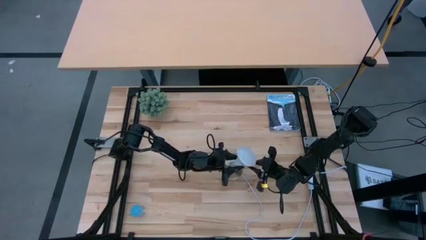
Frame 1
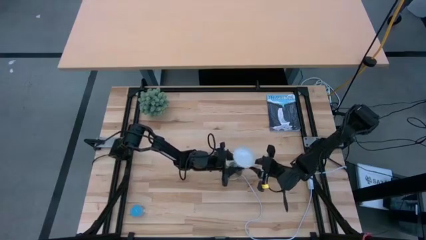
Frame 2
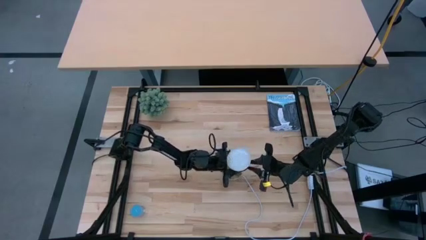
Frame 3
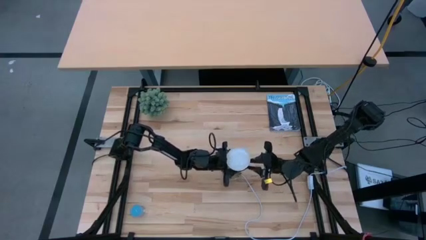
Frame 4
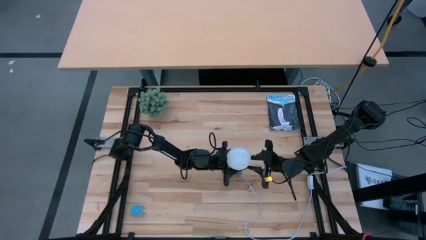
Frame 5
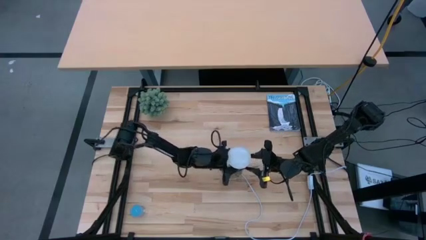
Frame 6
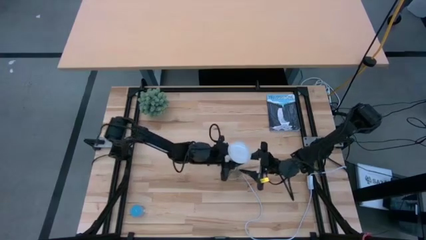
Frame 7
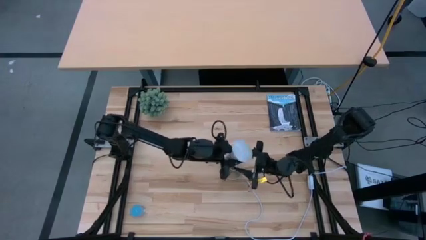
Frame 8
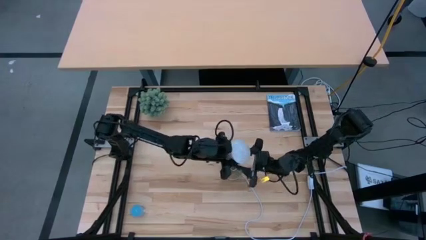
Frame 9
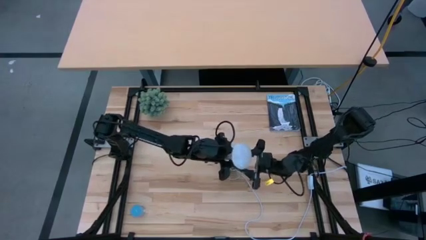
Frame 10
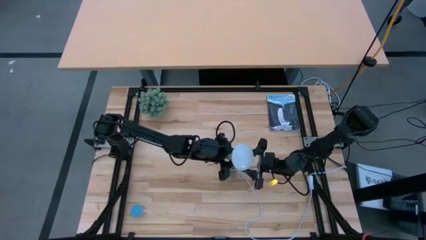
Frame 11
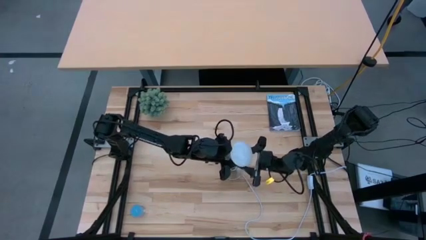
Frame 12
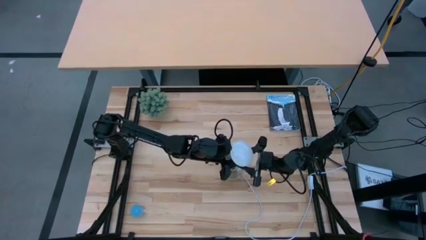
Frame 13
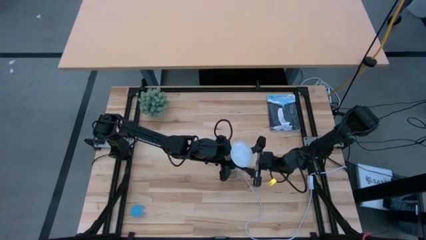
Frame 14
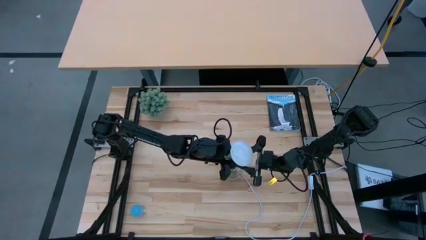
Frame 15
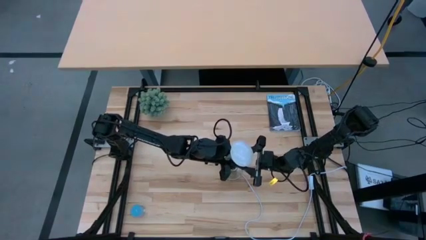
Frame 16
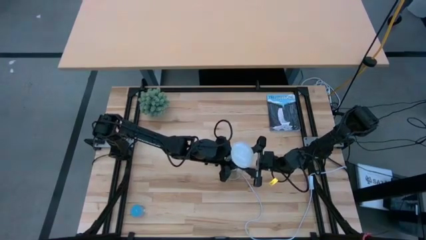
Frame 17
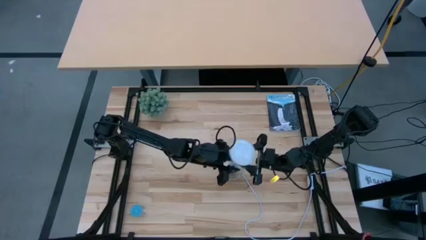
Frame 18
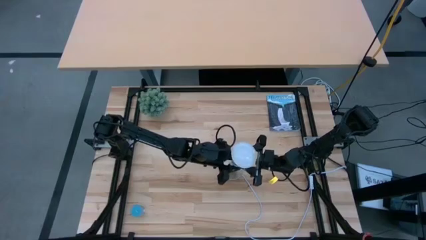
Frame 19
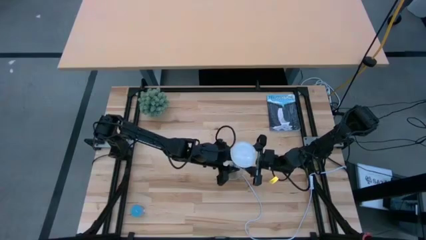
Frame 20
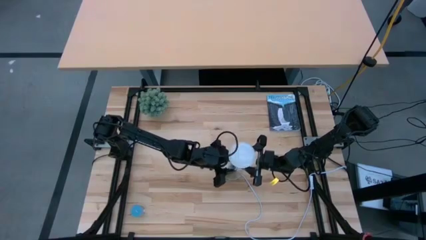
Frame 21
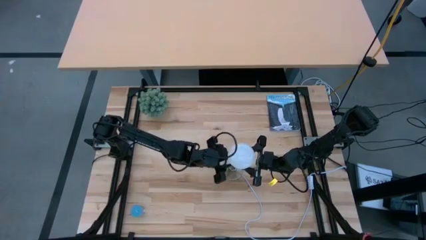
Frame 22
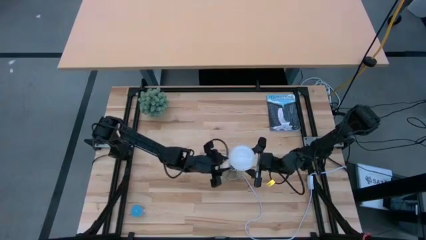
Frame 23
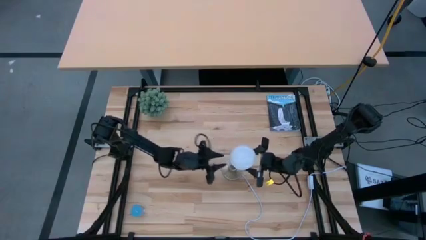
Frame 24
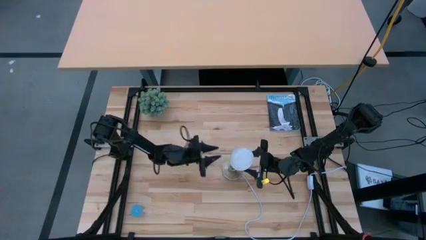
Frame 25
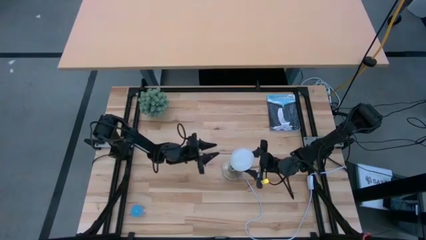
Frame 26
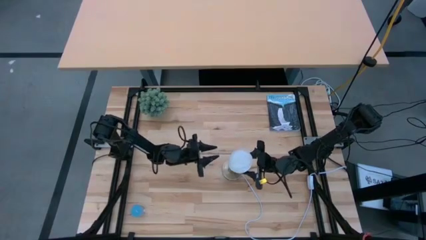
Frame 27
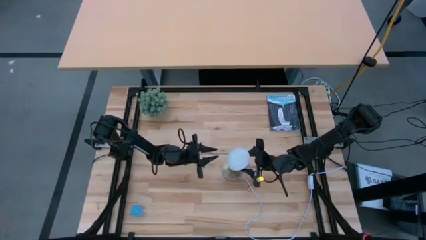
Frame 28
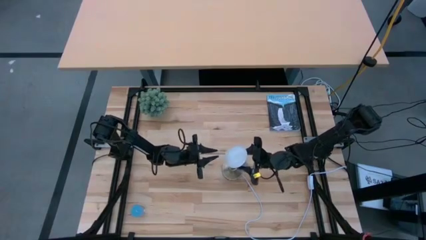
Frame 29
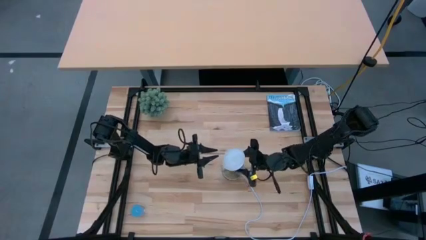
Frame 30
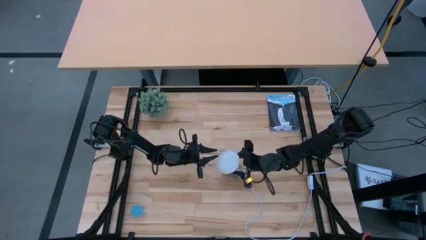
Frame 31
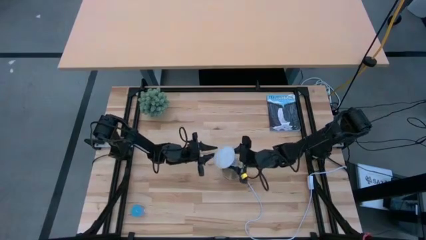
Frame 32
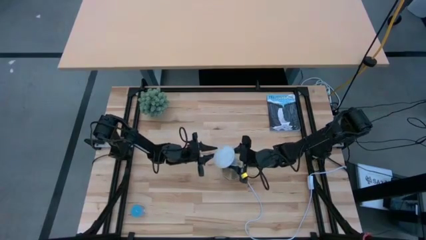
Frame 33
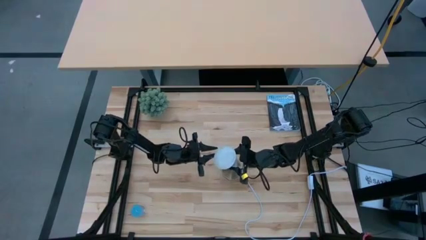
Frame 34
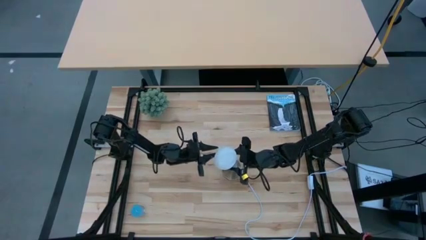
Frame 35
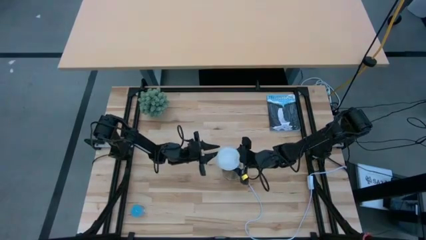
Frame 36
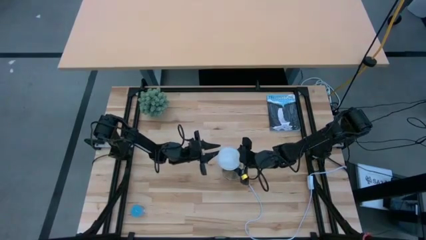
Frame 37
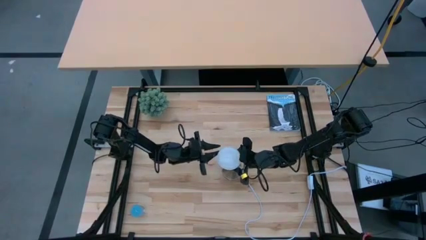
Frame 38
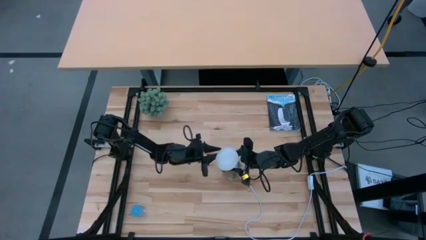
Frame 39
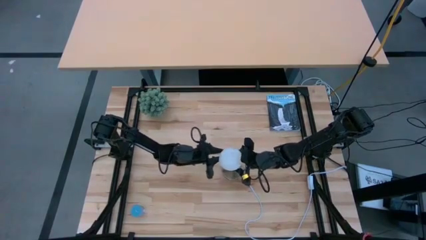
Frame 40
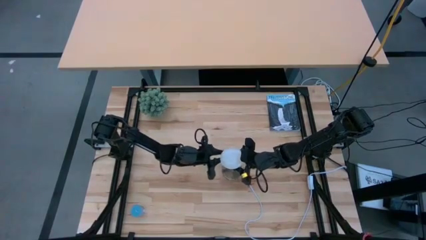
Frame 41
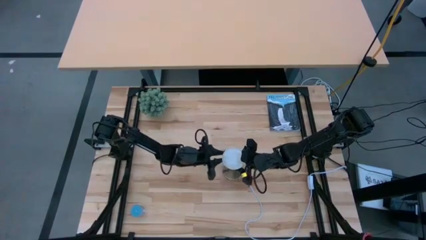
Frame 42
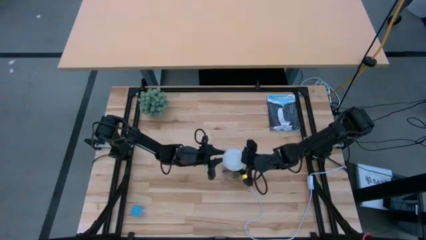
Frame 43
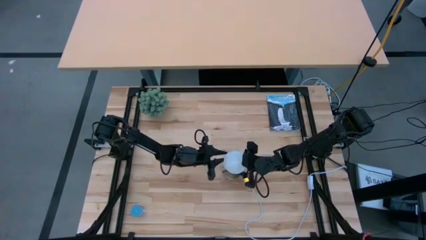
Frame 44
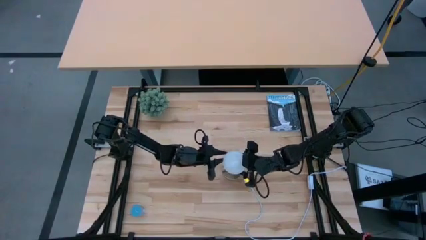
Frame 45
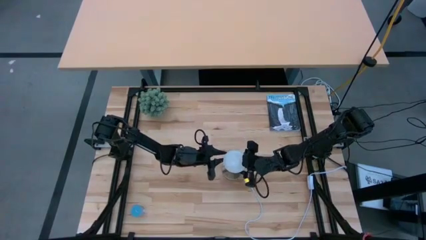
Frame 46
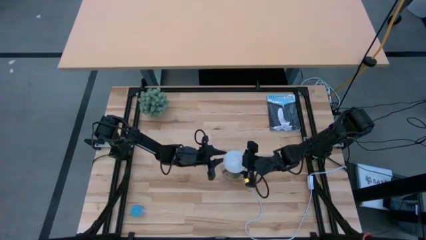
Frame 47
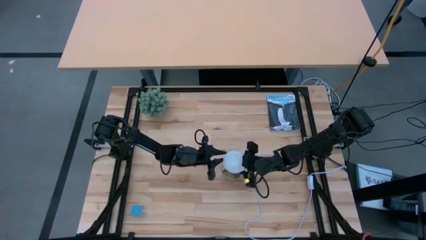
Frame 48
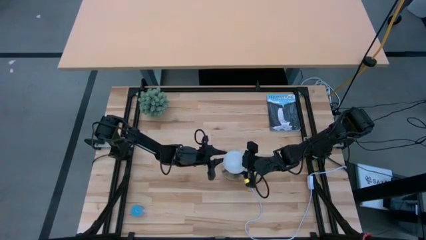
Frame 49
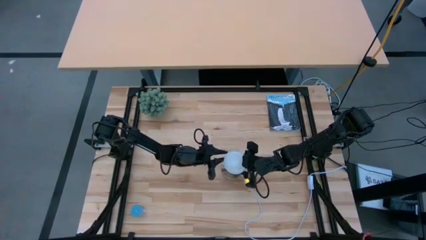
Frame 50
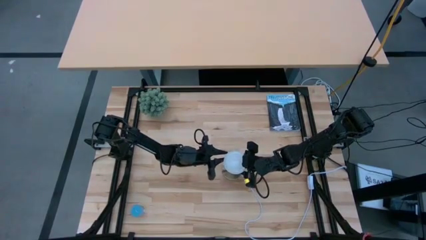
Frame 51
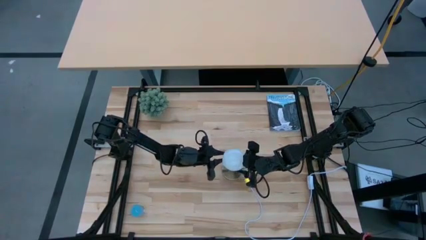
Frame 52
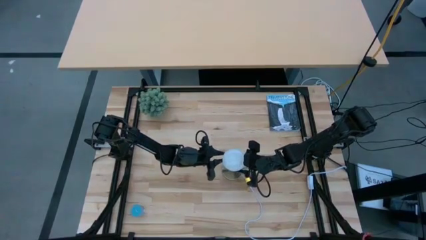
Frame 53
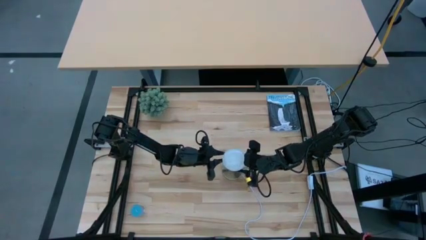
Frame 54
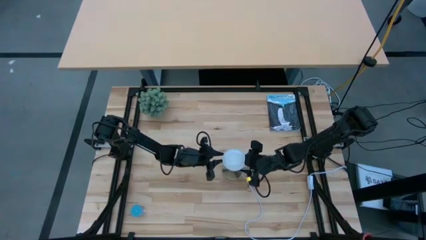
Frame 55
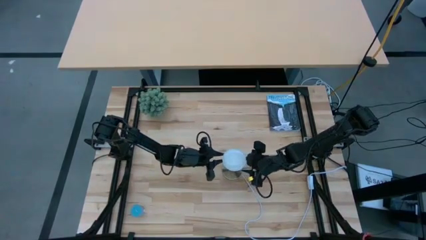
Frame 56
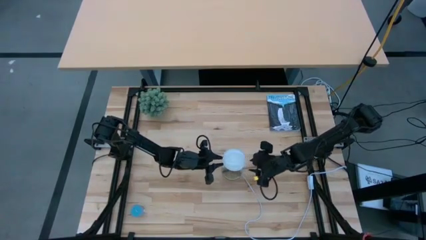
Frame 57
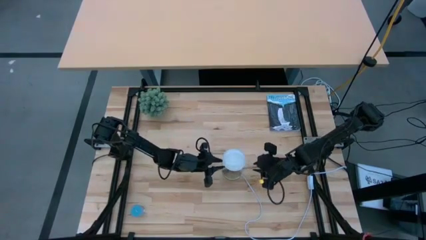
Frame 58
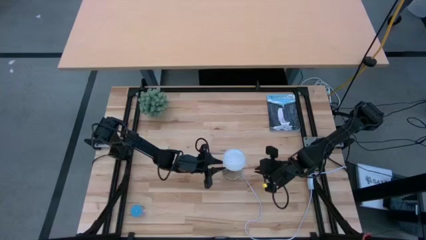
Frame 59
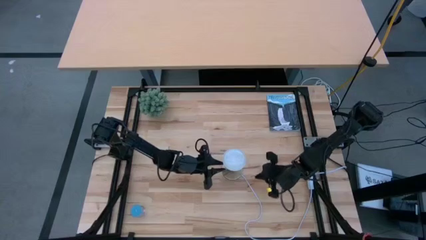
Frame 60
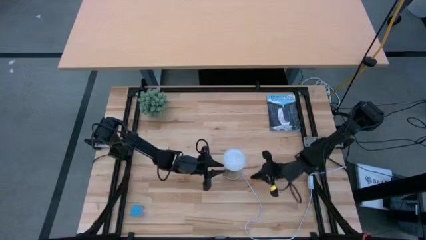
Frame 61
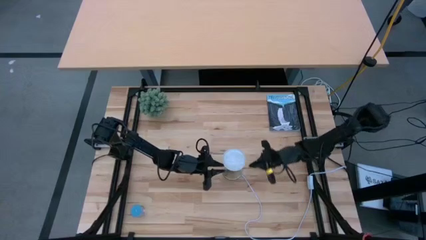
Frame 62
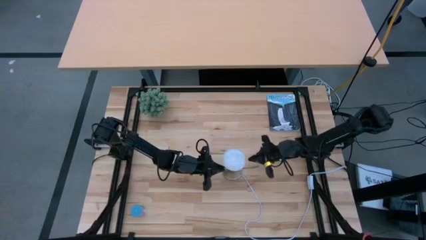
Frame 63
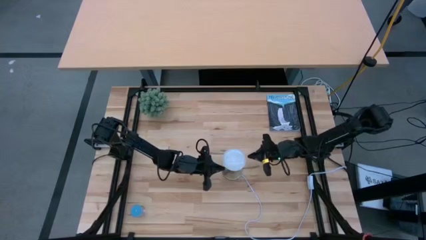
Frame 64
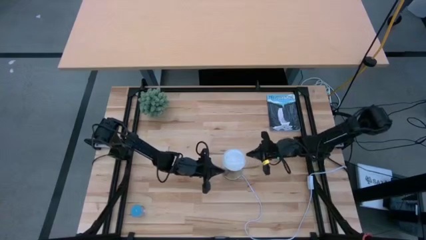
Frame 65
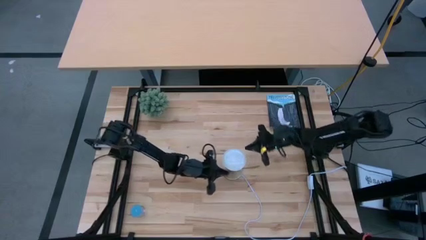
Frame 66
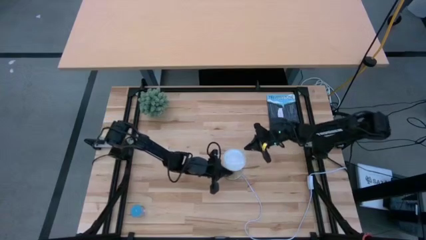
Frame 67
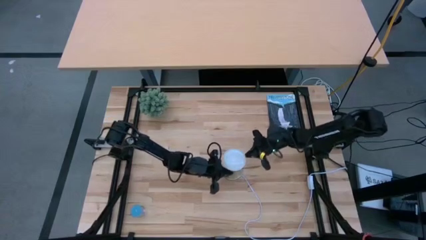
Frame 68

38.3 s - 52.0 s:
Task: Screw lightbulb
Insert the lightbulb into the lamp

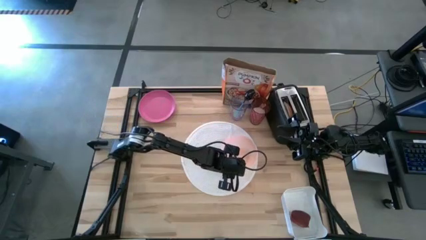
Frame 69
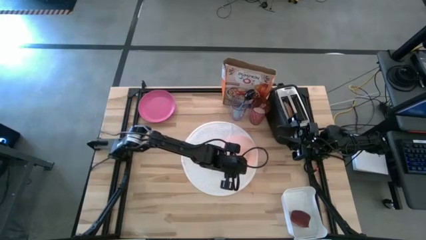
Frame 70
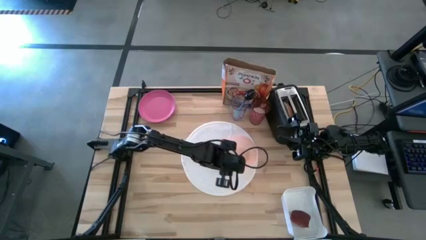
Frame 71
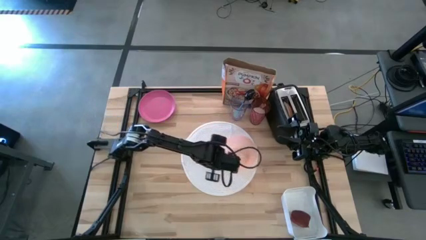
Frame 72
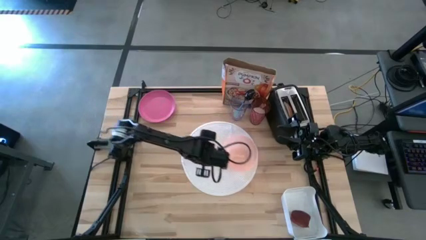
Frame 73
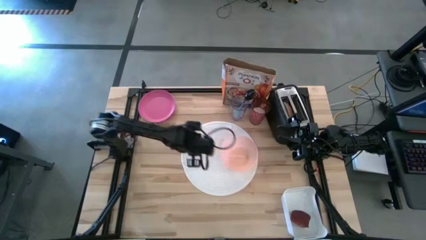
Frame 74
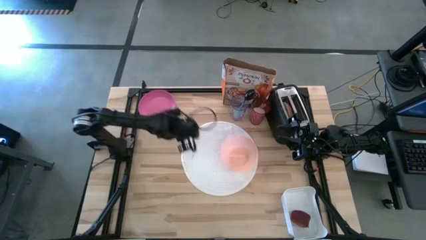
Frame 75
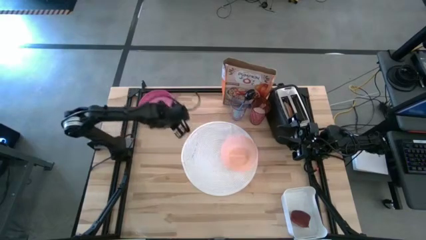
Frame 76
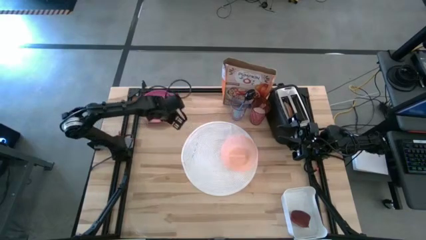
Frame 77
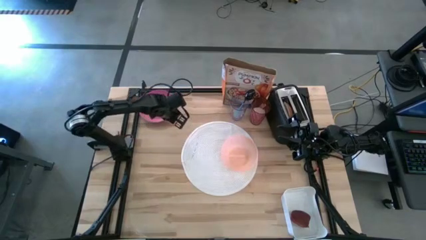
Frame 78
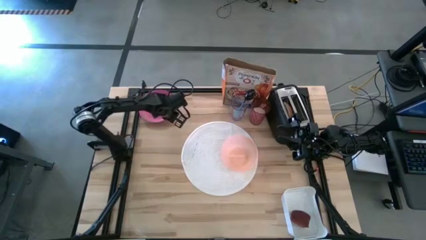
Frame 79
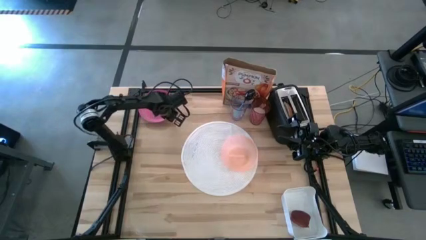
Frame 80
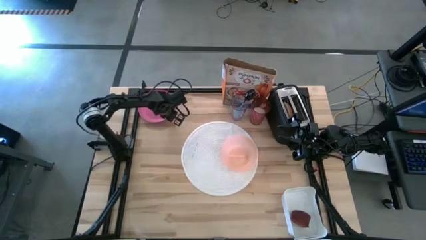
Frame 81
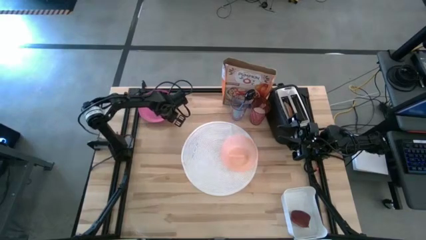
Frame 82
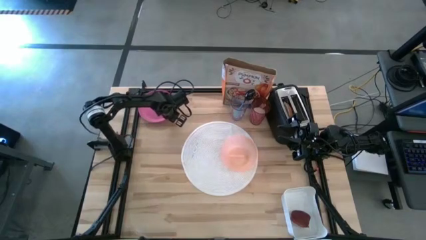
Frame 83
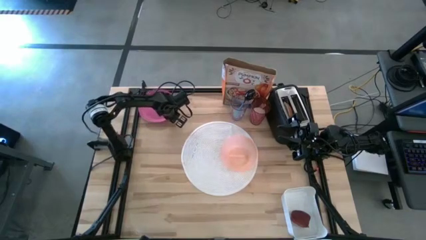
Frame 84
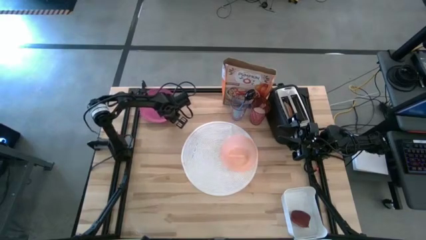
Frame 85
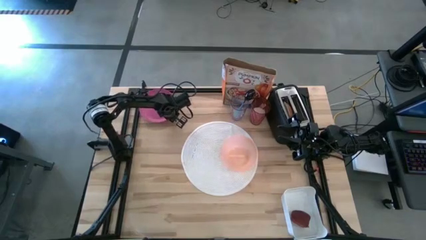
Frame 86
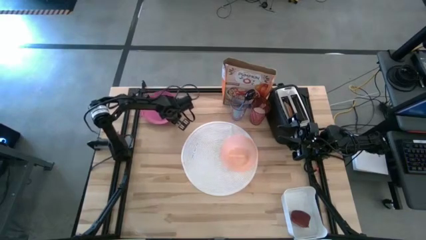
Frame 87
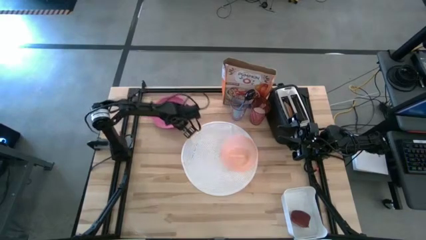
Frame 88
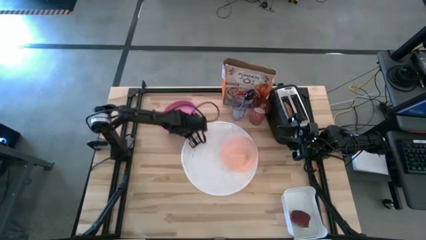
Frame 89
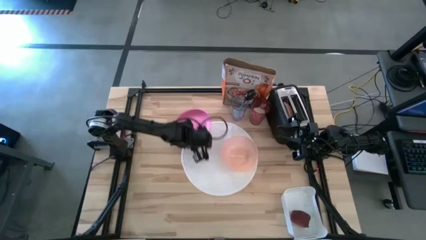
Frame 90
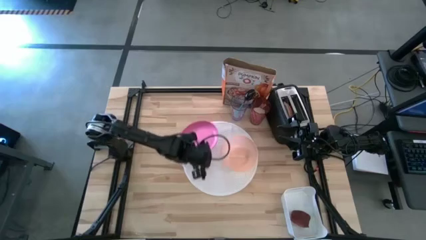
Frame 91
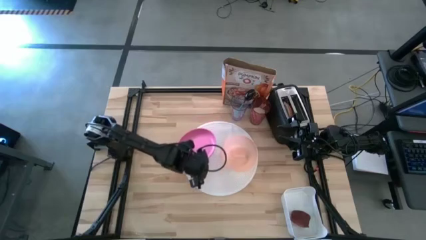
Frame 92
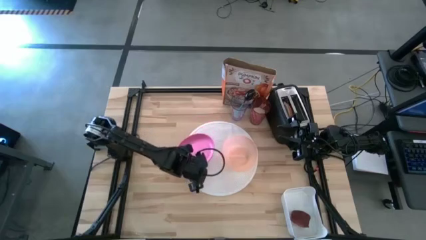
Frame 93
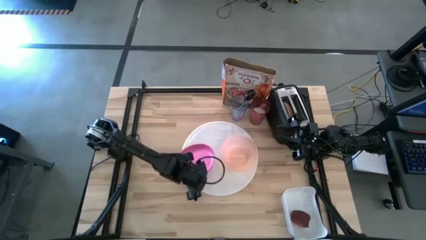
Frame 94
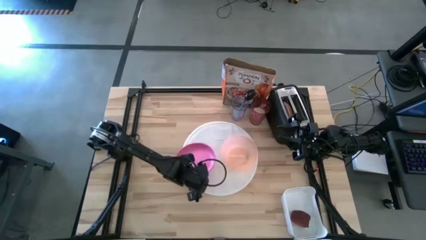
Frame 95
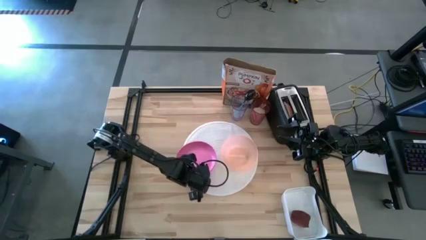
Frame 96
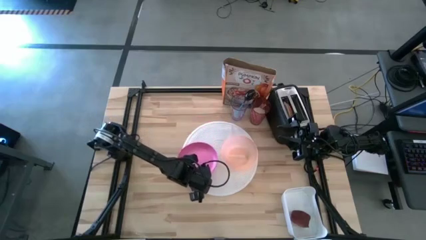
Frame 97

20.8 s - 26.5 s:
Task: Arrange a breakfast setting
Put the pink plate on the left side of the orange bowl on the white place mat
